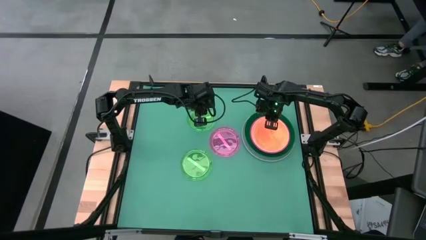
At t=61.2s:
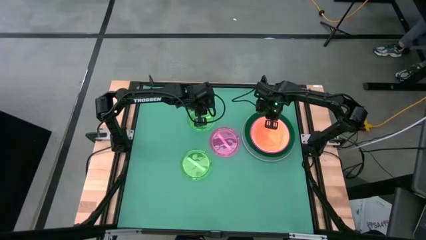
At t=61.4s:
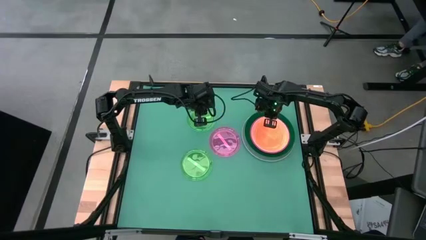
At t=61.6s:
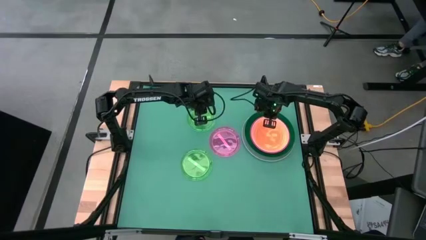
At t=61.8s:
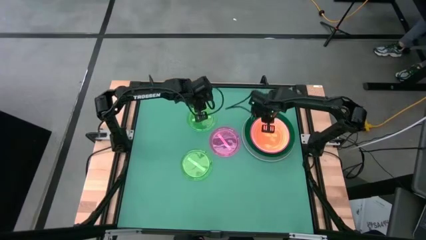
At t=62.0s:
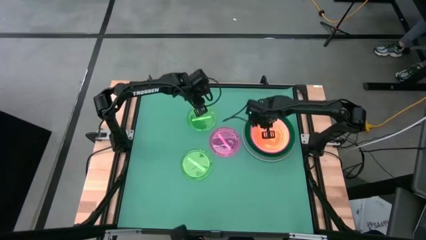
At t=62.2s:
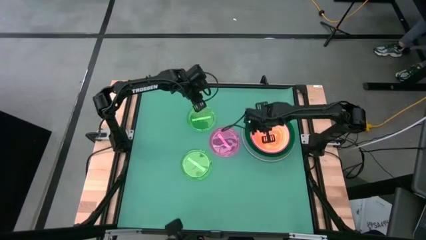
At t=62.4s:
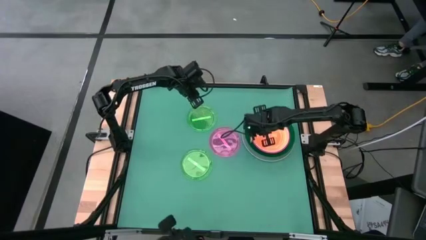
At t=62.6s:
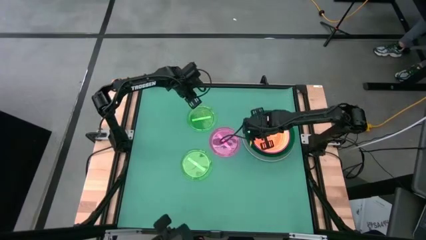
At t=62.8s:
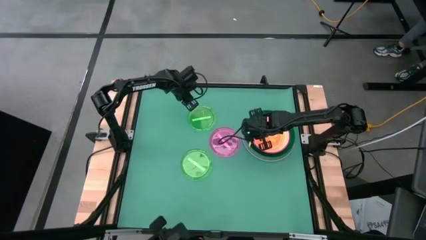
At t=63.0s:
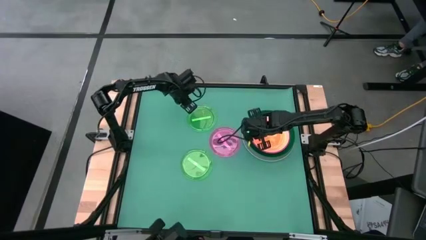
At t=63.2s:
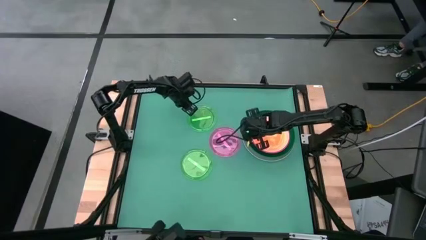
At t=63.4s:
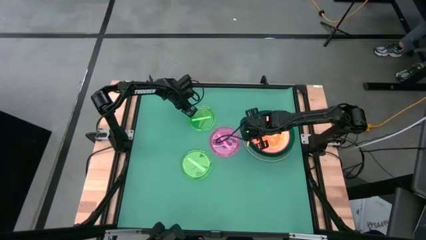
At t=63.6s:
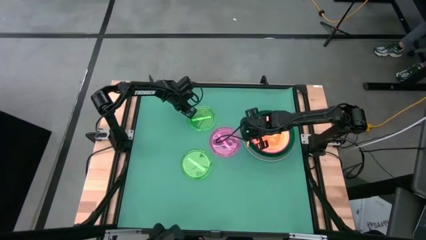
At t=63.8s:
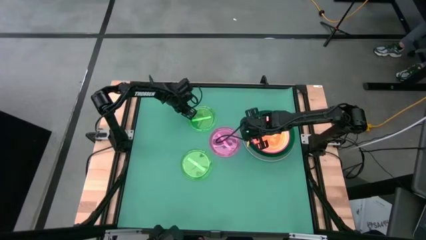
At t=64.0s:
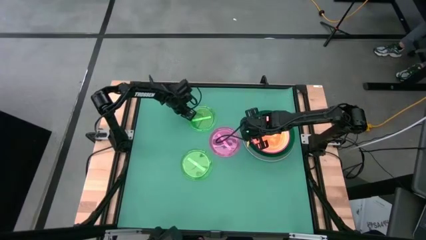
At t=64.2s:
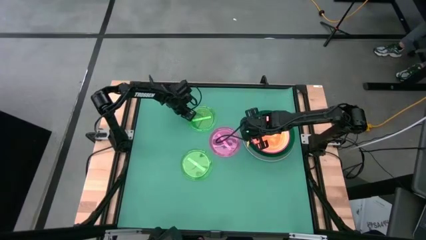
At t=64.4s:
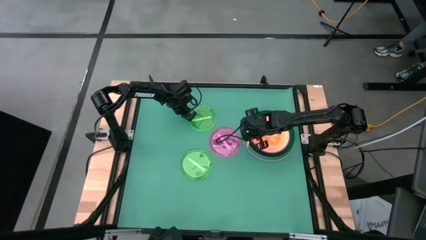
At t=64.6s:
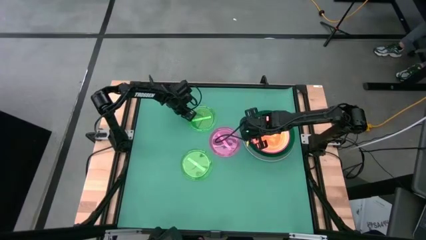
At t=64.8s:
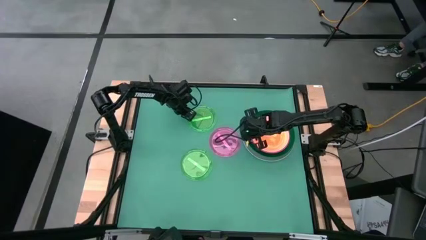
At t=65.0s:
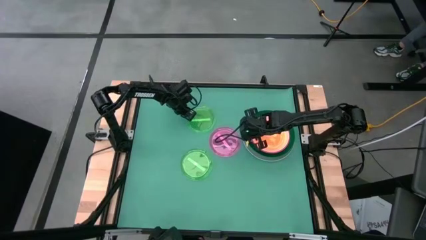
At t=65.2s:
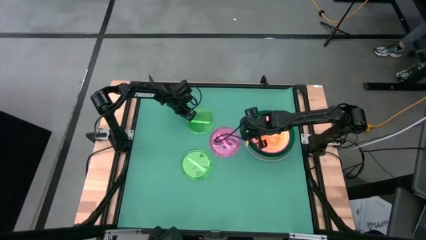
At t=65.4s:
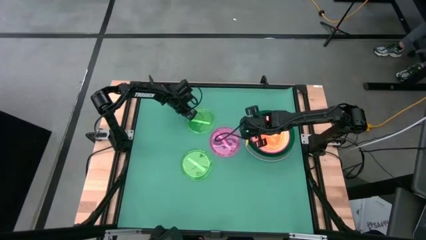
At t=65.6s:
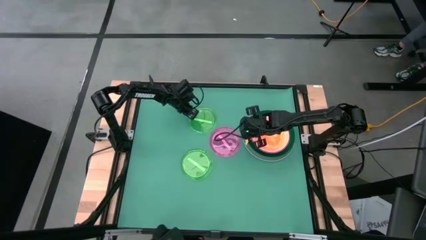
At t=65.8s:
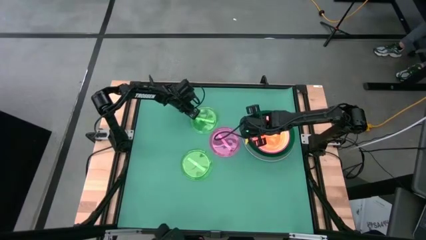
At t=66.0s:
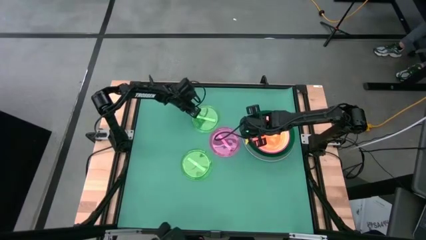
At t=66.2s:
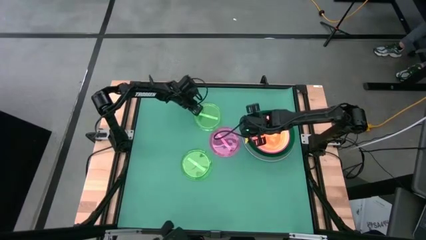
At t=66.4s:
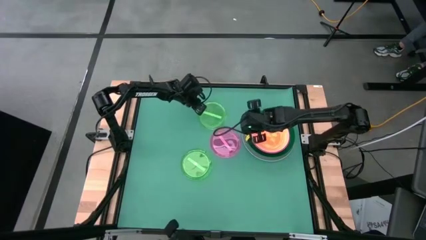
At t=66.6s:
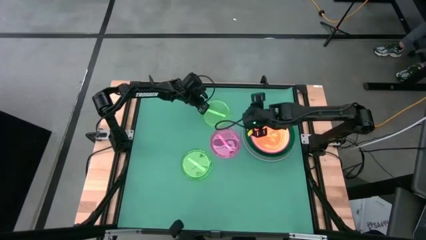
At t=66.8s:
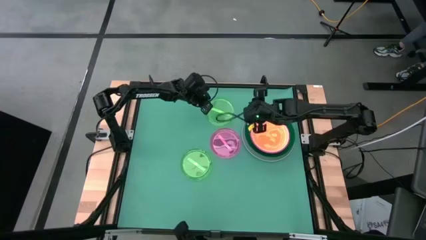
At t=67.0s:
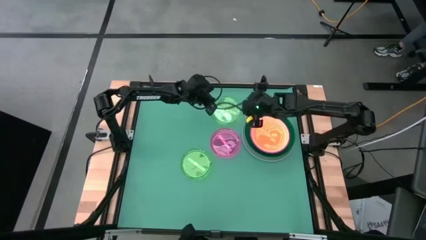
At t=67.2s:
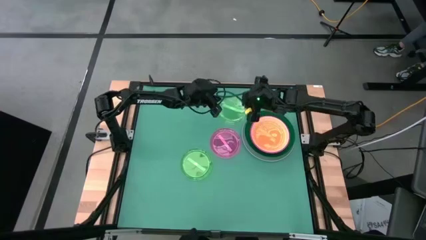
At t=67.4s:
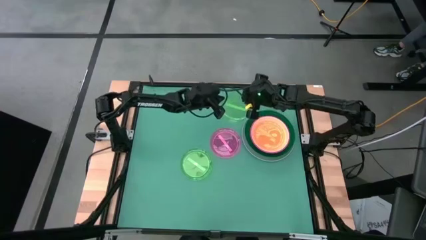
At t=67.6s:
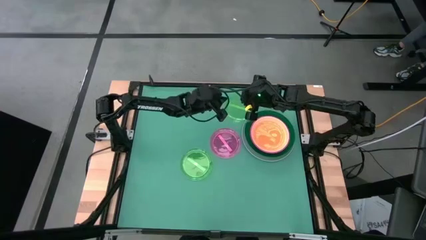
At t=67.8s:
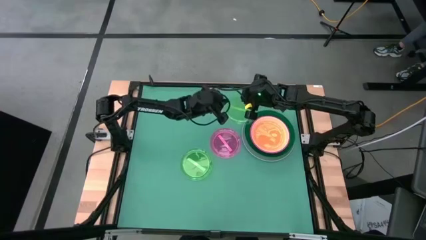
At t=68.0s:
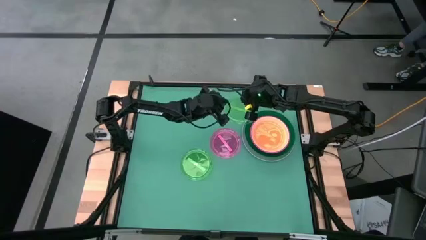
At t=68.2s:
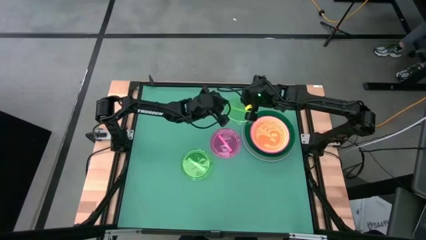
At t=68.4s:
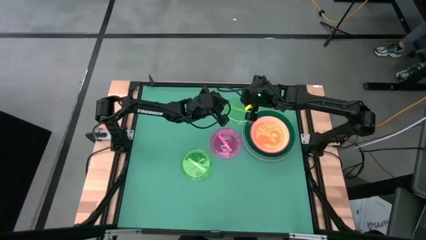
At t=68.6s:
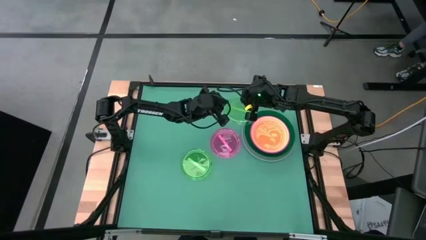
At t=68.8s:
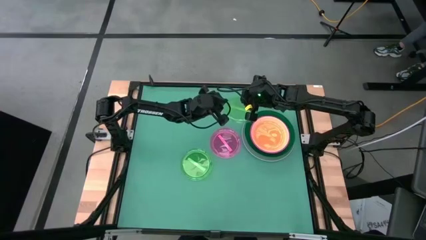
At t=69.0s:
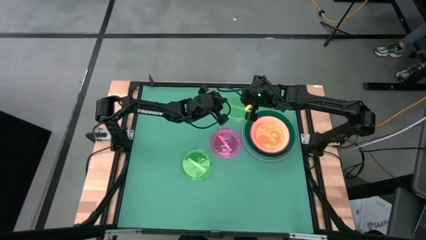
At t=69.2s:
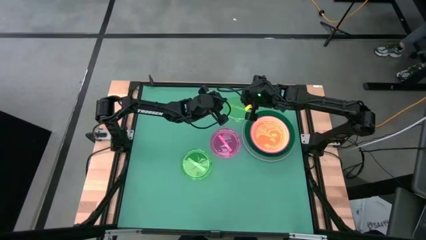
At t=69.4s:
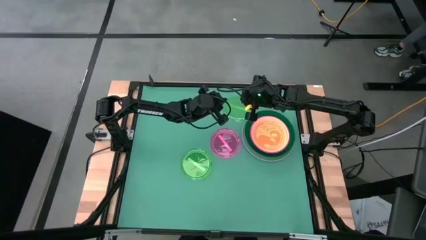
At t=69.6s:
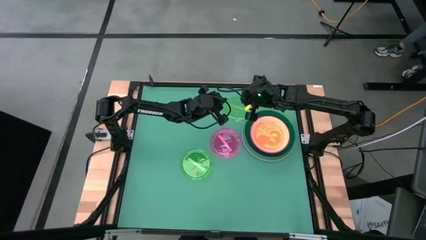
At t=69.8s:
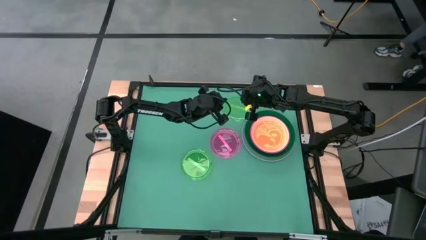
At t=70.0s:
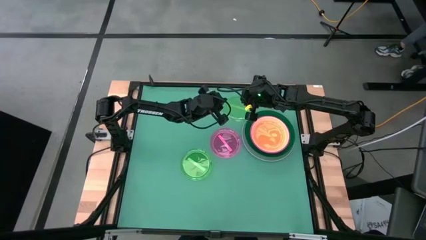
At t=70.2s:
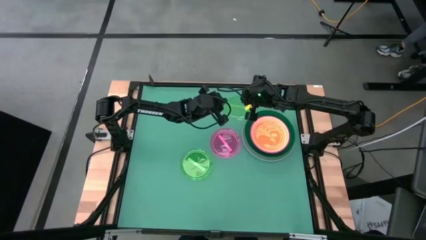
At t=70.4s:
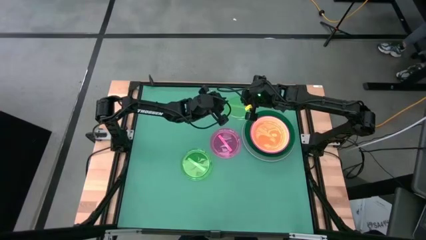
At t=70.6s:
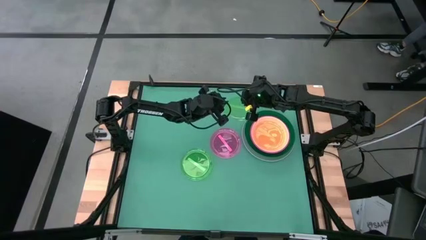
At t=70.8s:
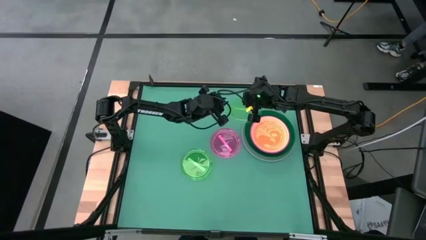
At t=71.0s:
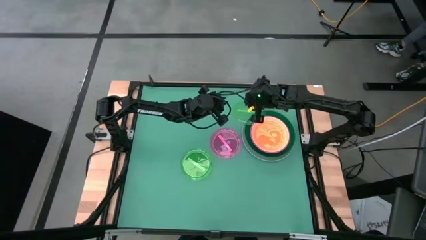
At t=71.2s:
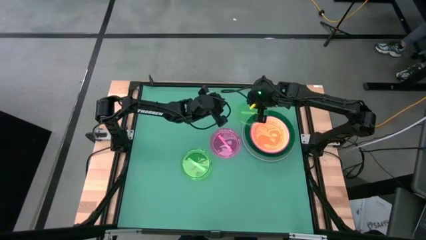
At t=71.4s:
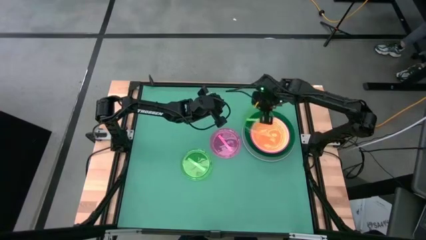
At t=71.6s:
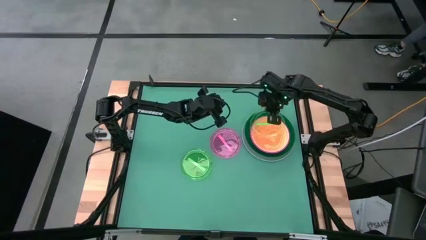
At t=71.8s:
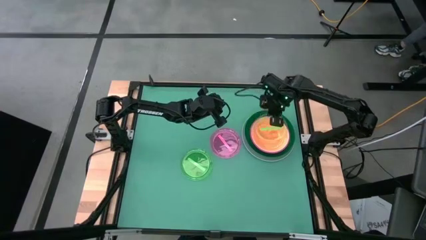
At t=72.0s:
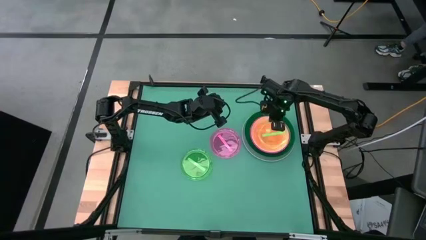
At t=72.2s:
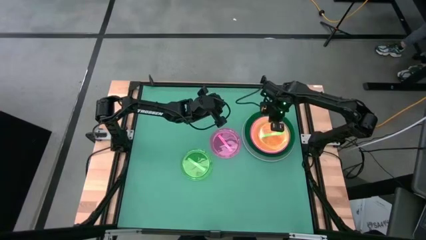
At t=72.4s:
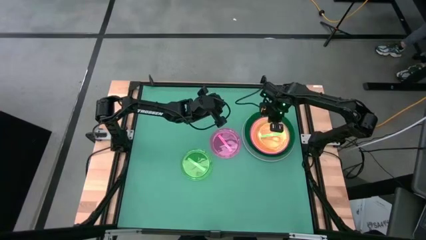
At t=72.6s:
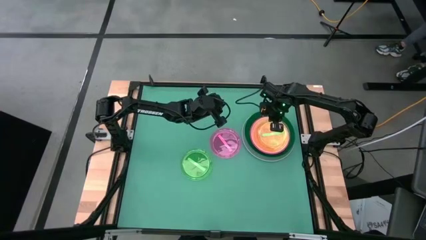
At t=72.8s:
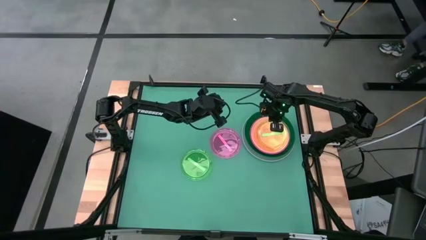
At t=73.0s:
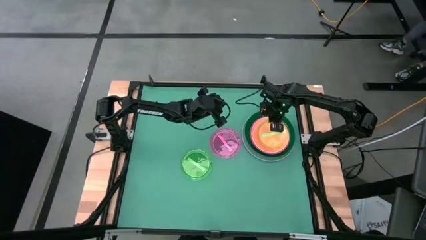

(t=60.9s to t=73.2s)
Task: Stack plastic plates
Stack the top light green plate on top of the orange plate

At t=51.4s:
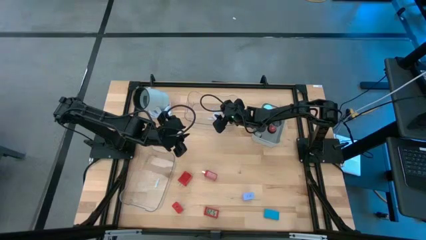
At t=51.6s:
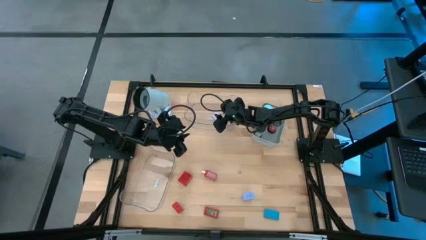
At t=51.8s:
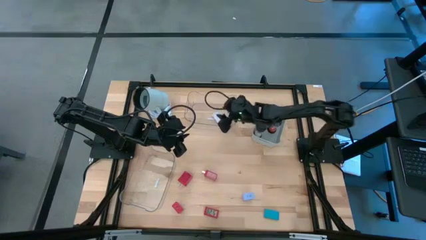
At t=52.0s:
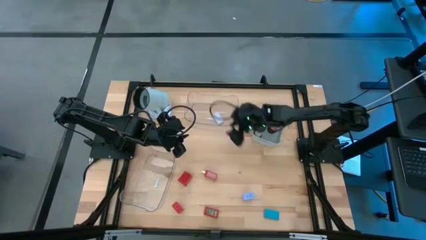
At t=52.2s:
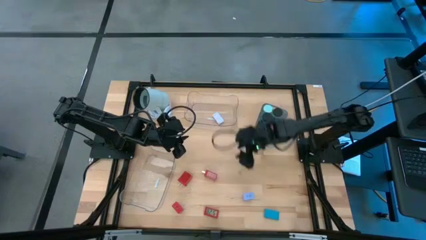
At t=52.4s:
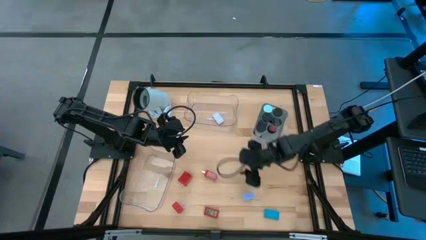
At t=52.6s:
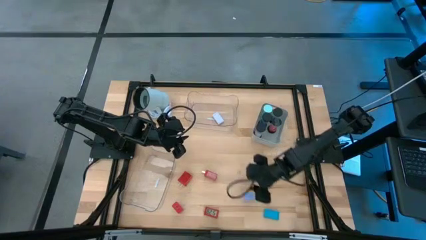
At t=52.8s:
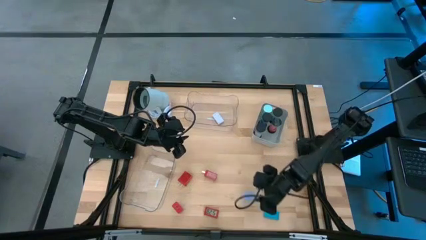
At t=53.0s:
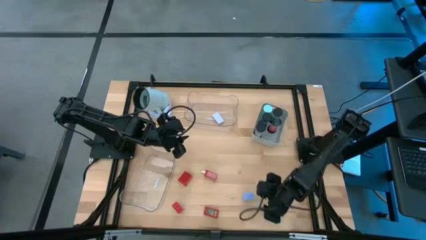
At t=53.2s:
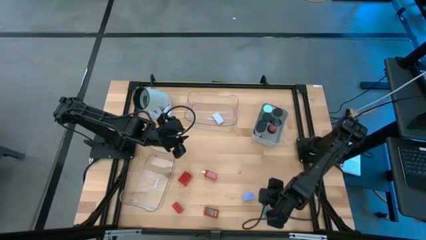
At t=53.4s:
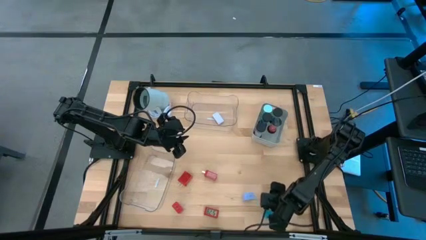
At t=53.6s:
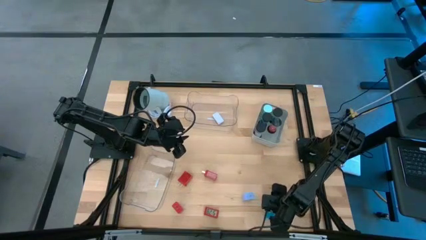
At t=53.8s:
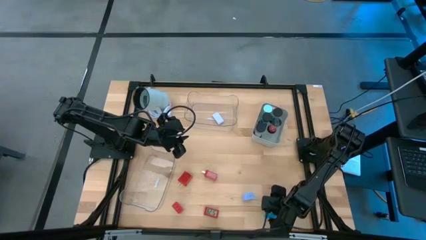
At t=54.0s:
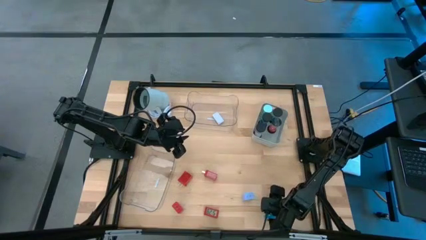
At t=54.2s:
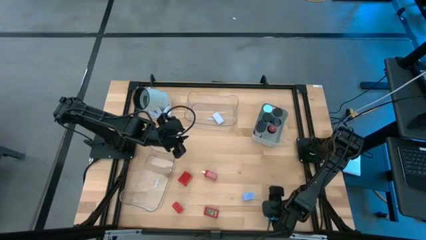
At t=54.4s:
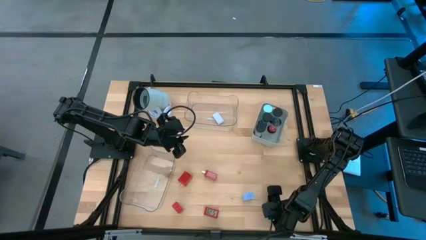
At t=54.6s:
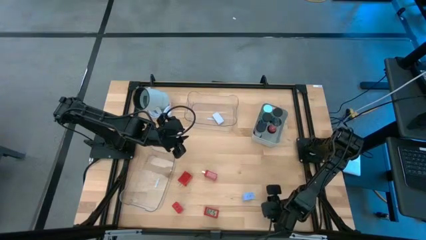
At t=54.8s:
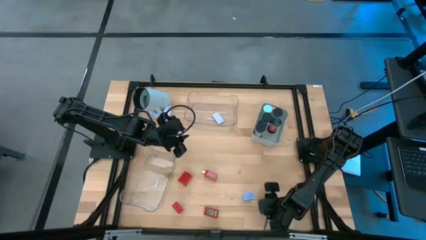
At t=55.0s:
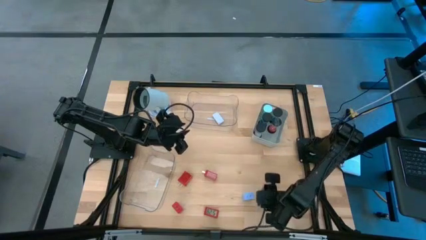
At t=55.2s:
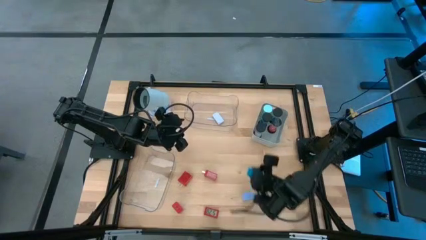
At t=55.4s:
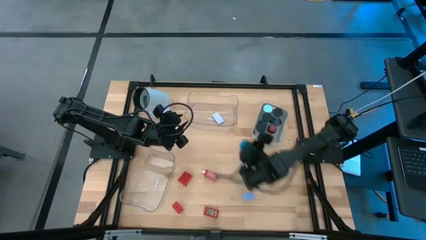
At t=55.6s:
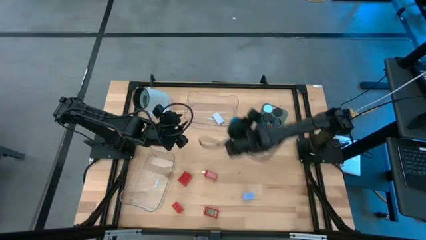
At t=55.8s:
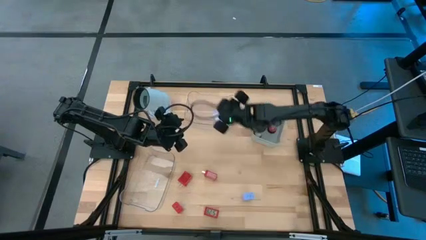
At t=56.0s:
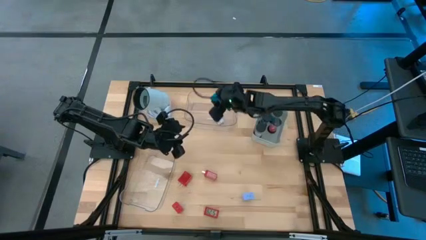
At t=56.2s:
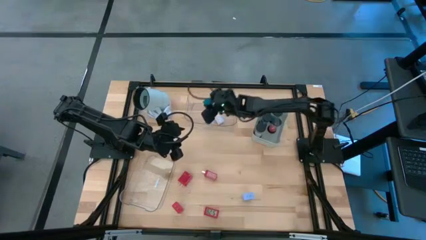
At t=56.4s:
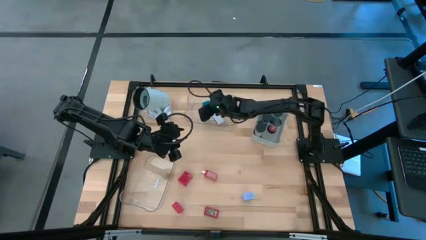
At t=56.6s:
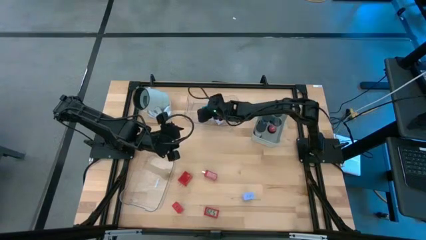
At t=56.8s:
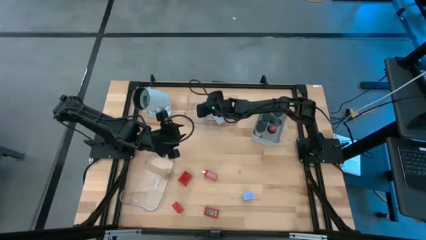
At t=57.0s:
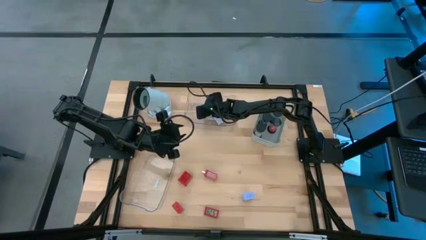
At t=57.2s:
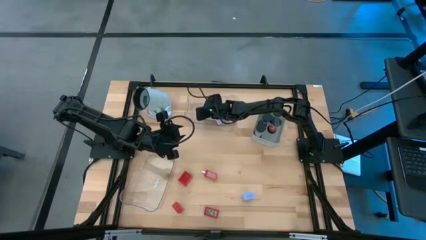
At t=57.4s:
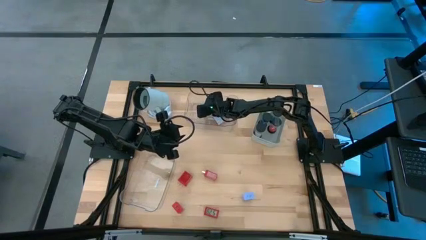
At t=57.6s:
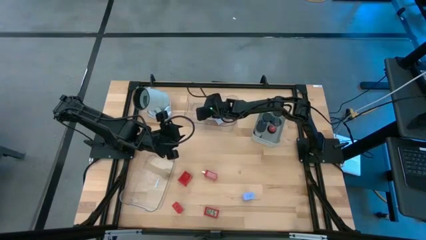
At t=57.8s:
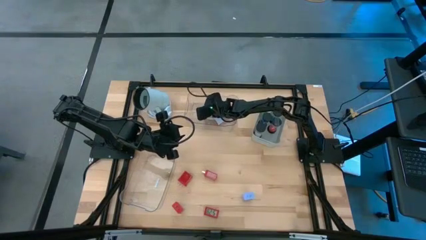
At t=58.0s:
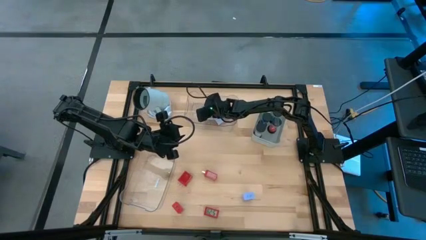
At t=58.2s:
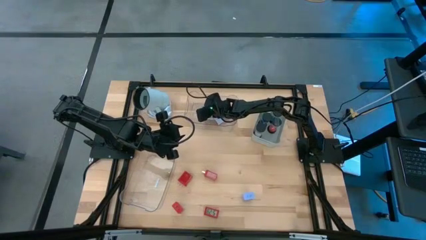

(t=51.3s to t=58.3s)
Task: Pick & Place Office items
Put the blue digital timer clock into the top clear bin
